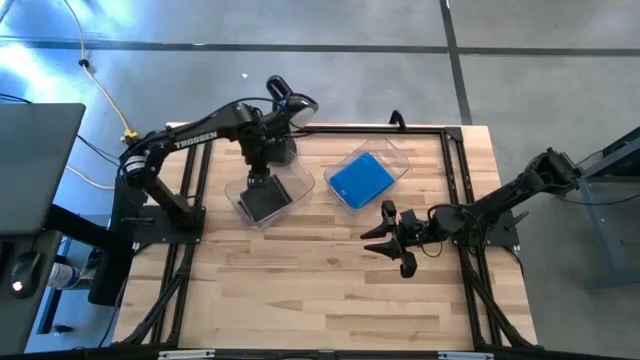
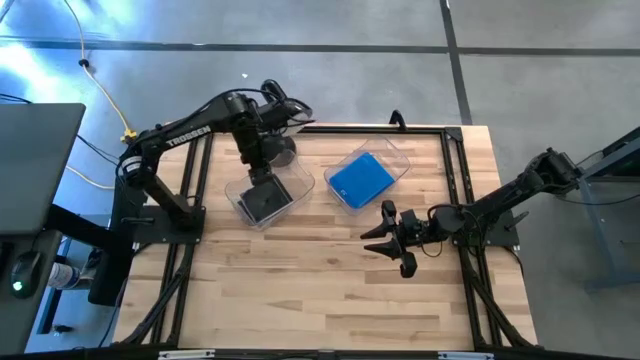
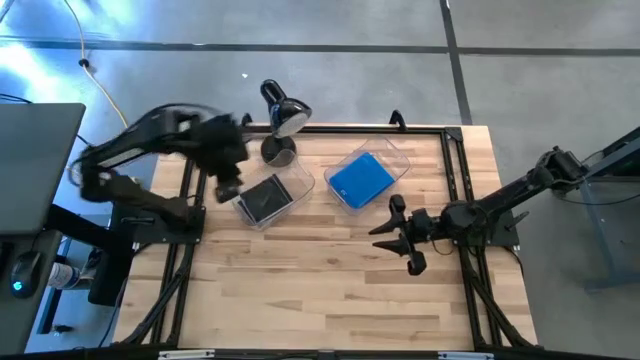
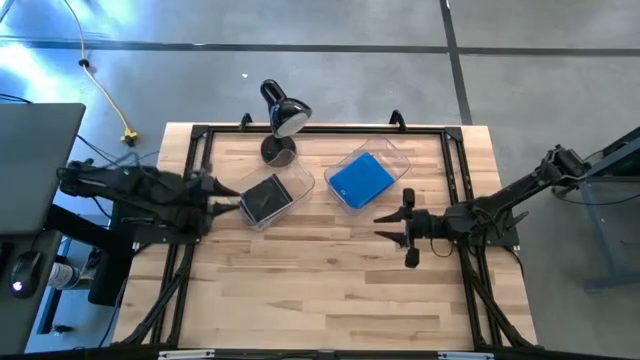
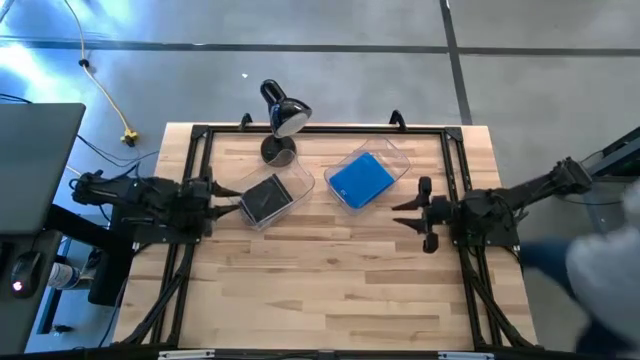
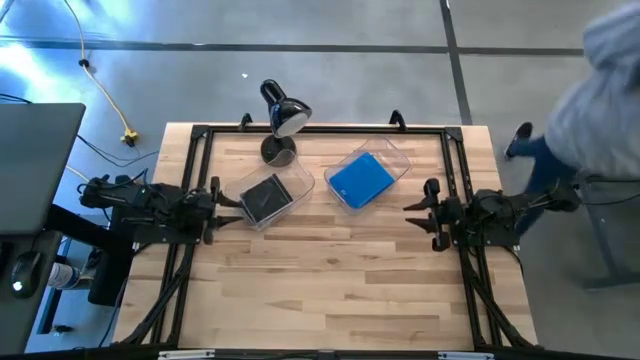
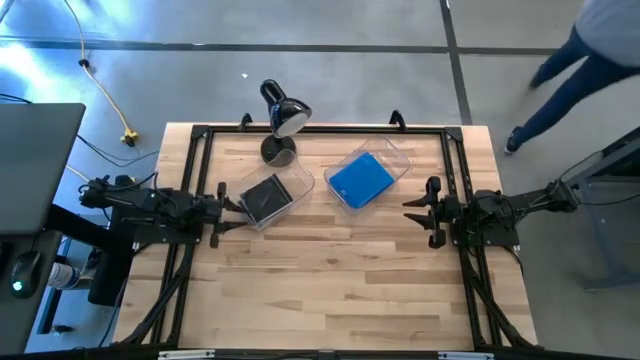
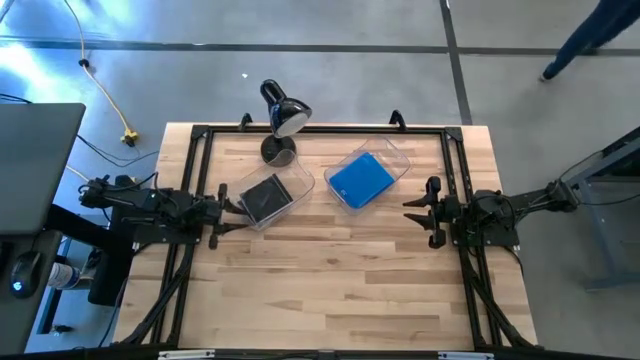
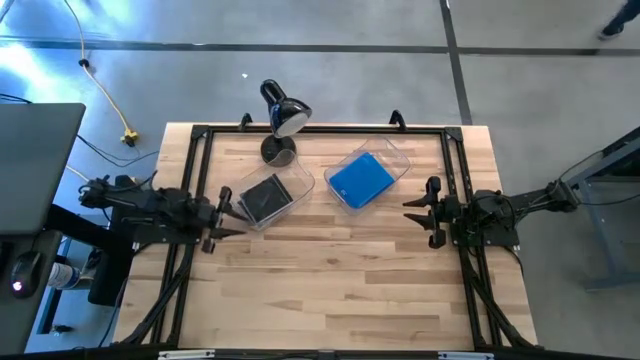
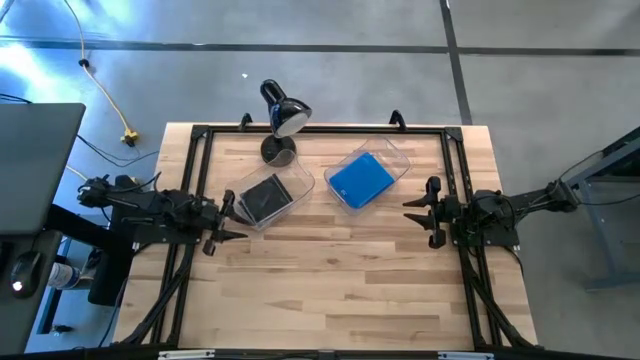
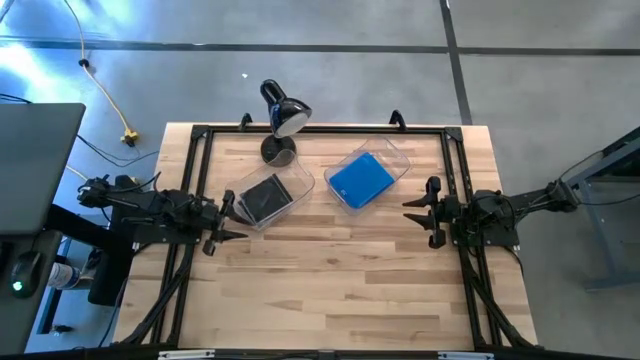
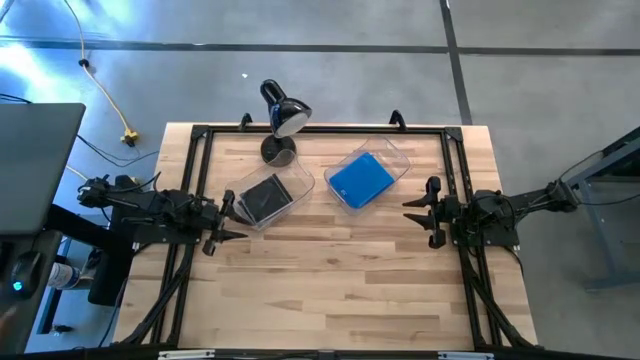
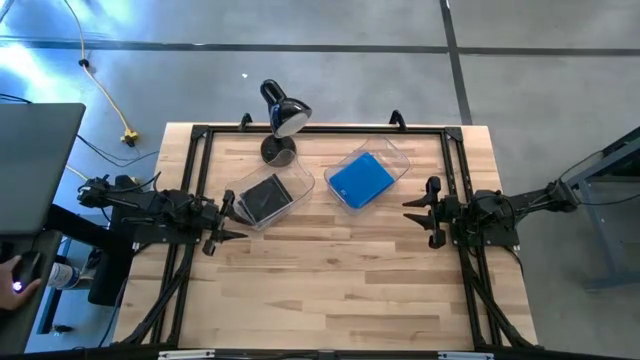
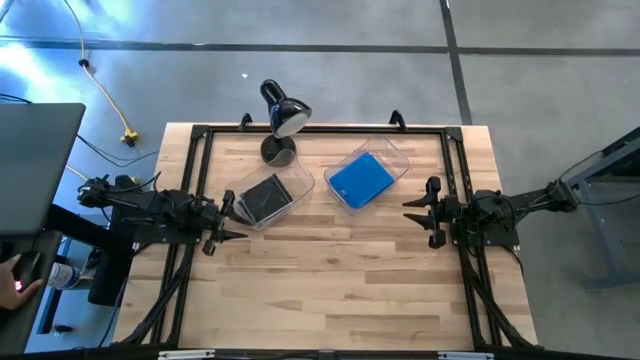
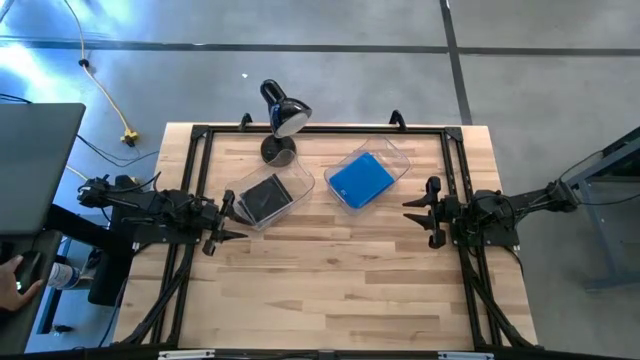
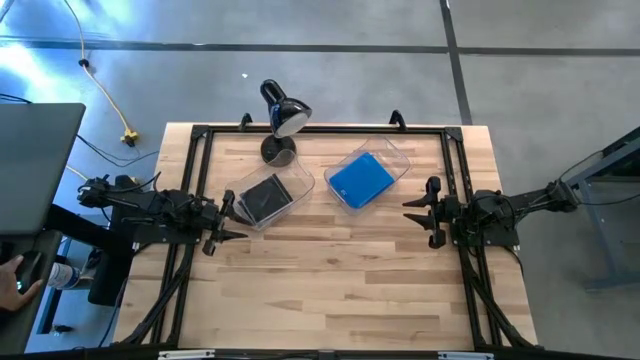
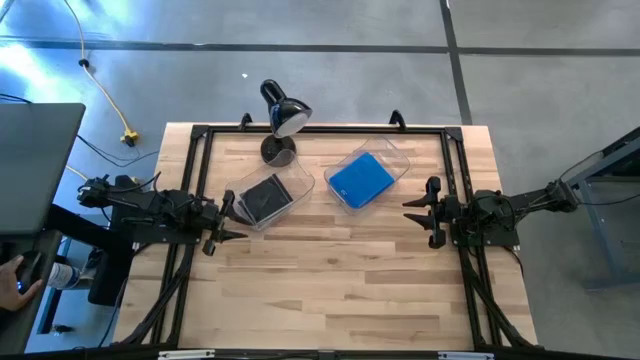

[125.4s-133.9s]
Task: Pick & place jewel cases by type
Return to Home Position

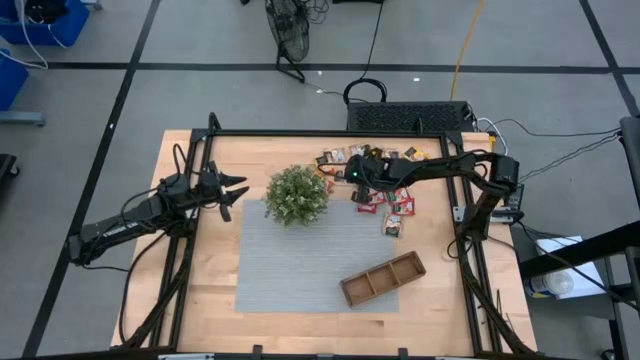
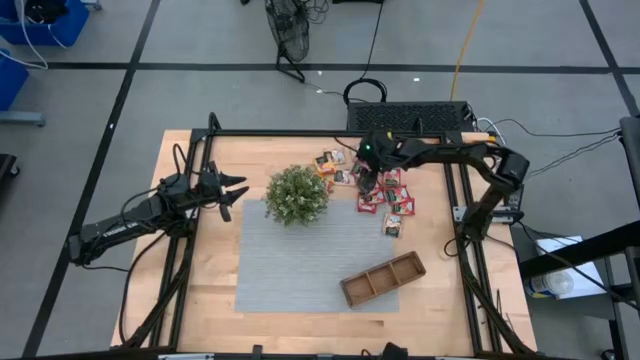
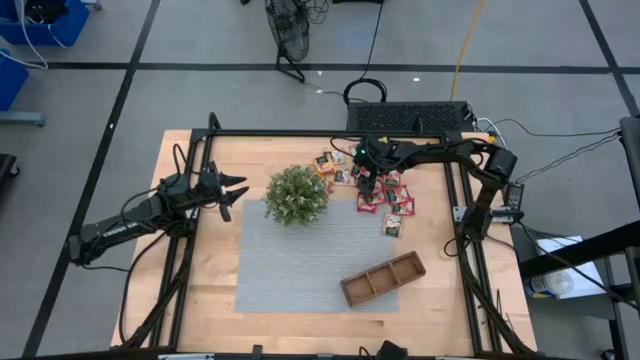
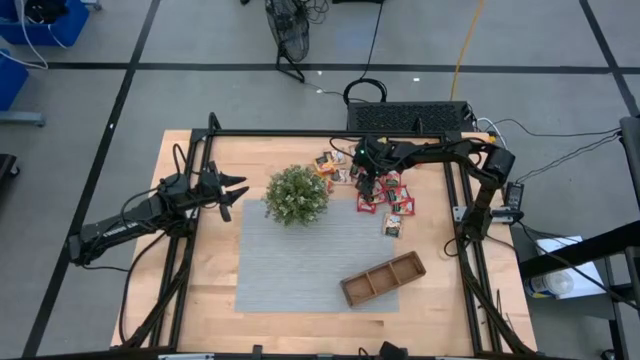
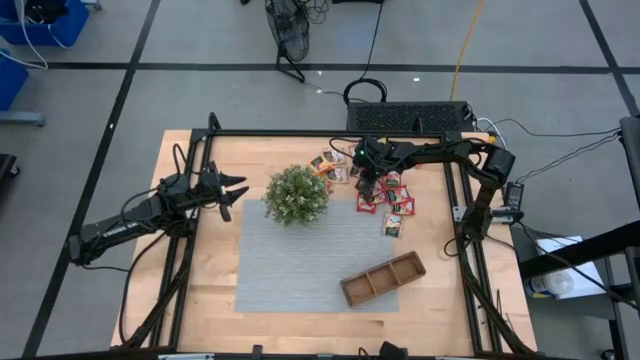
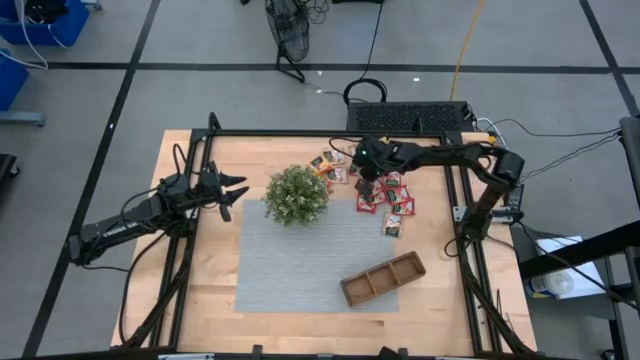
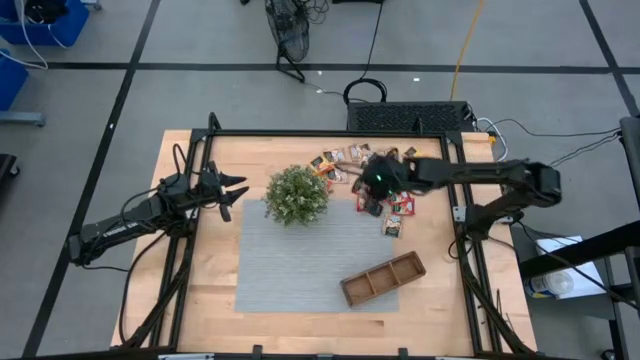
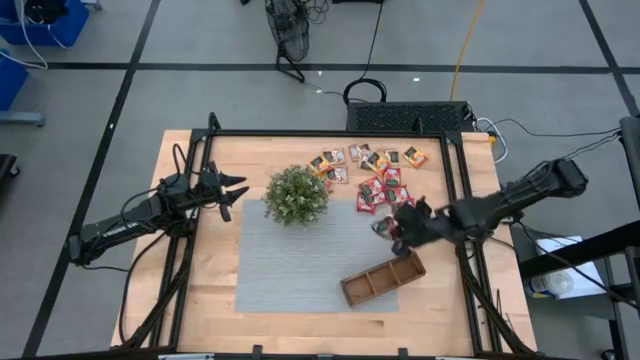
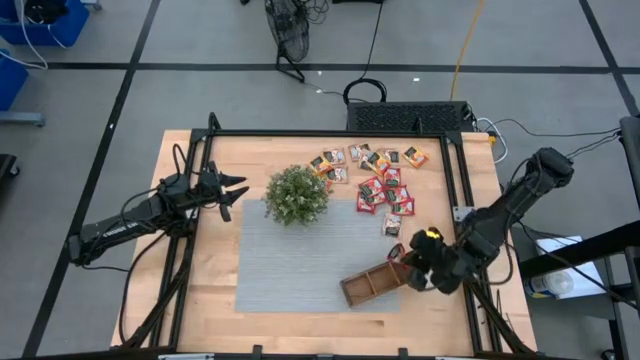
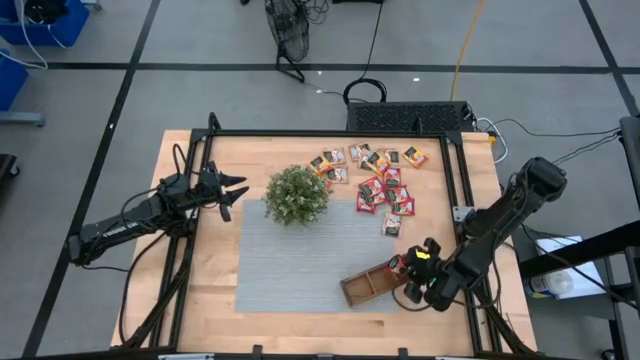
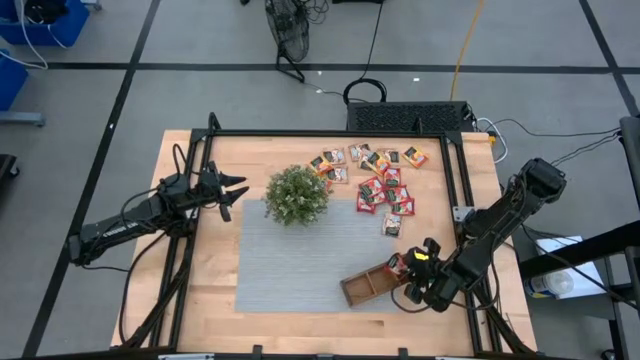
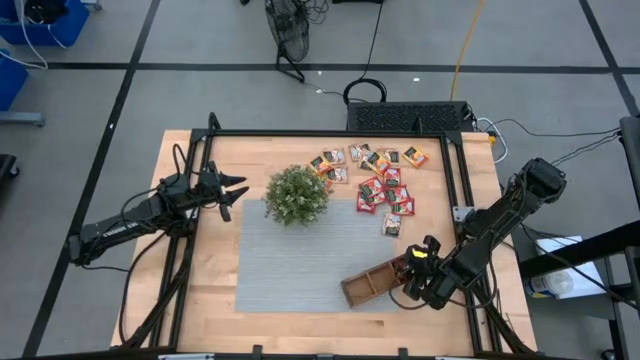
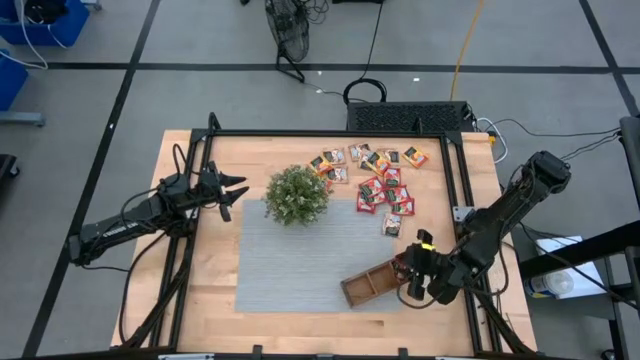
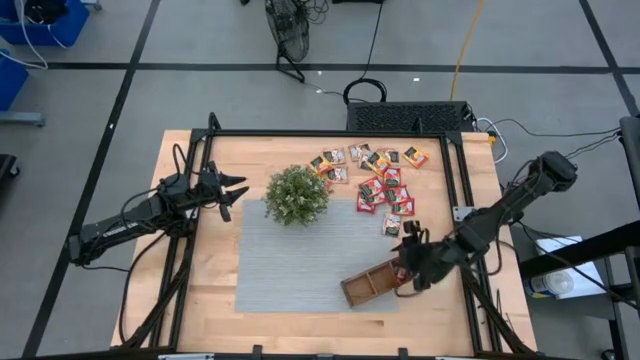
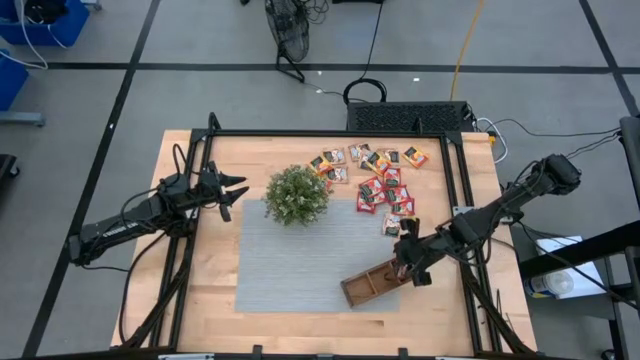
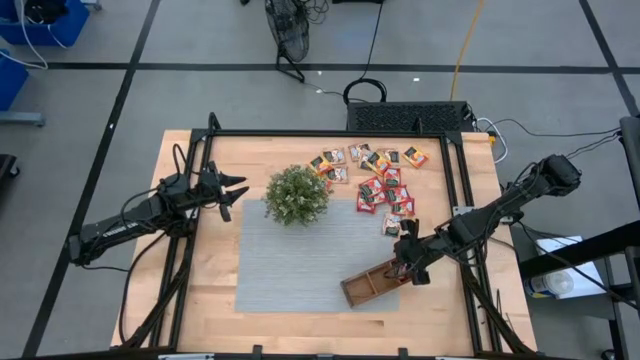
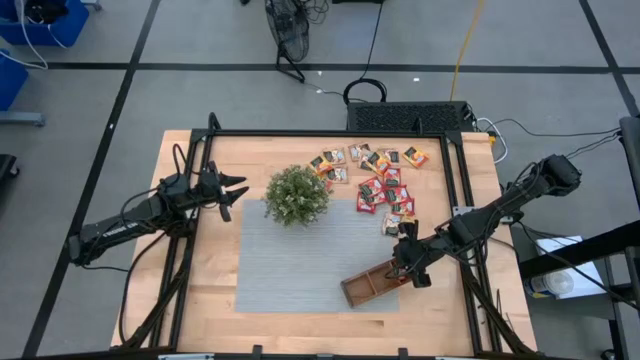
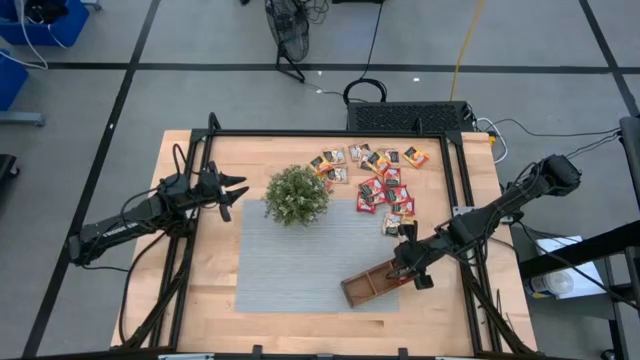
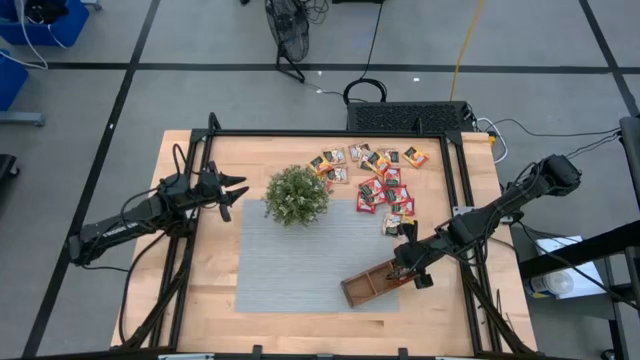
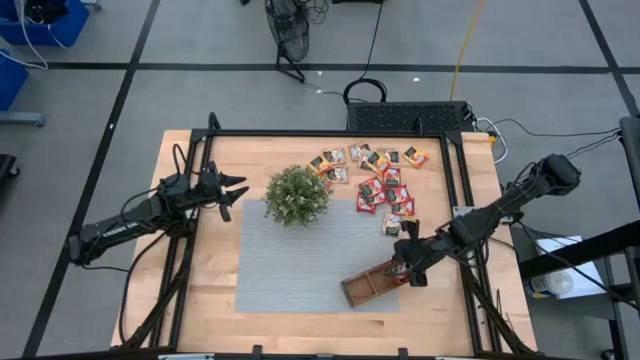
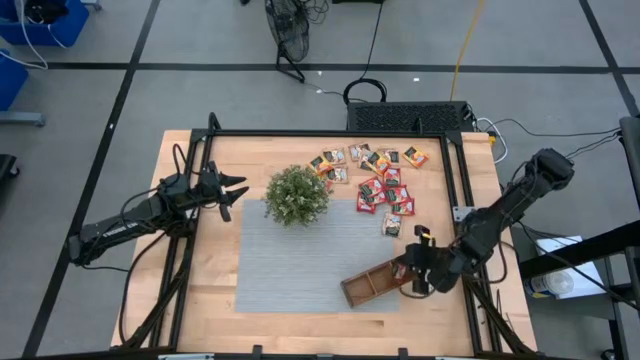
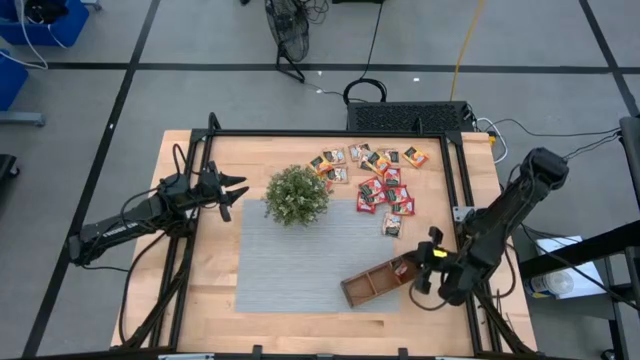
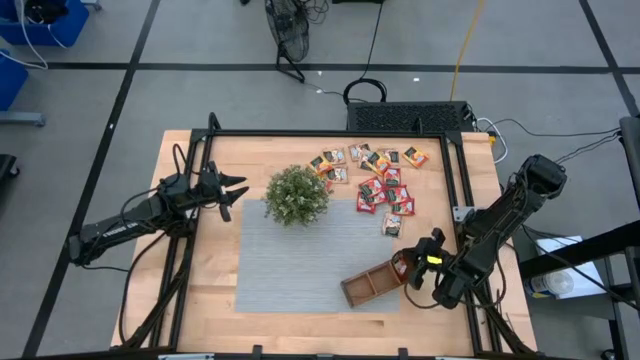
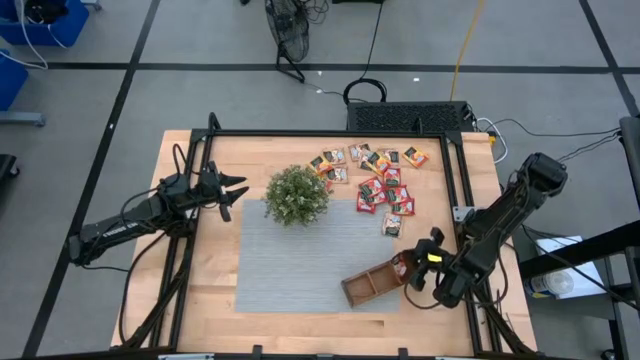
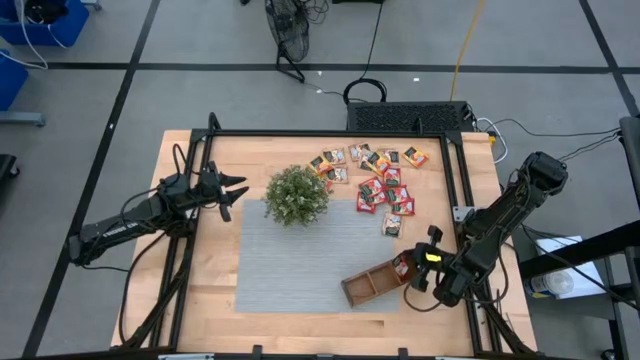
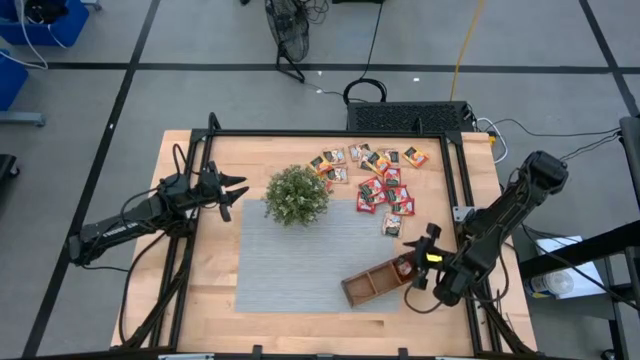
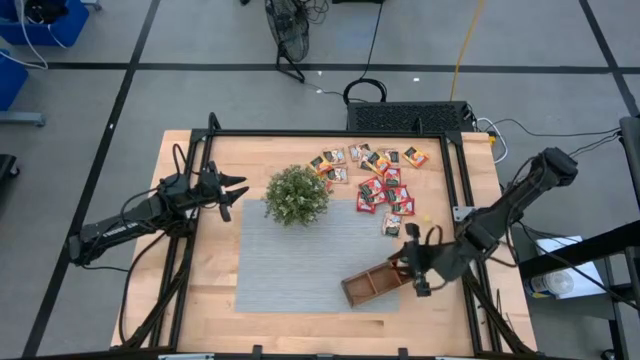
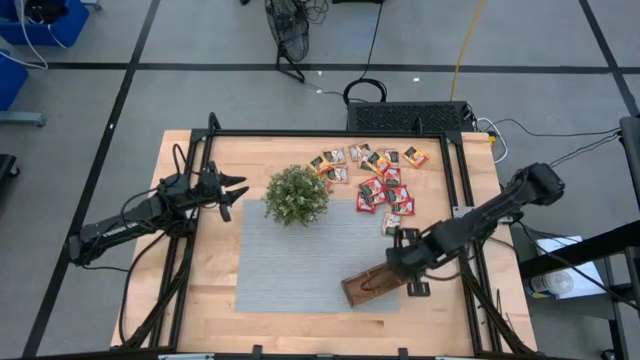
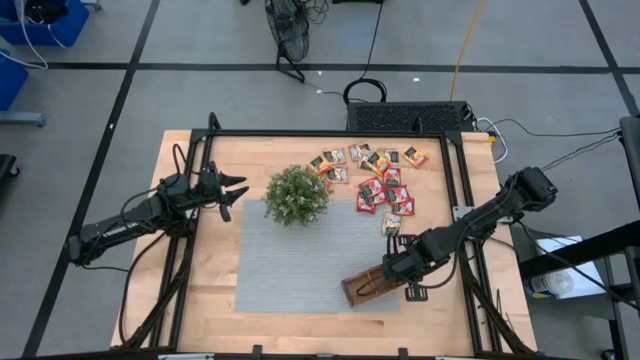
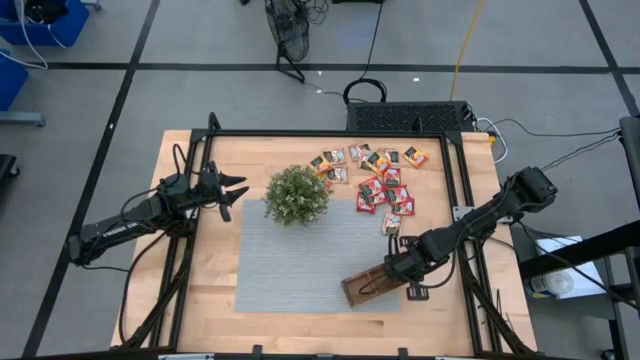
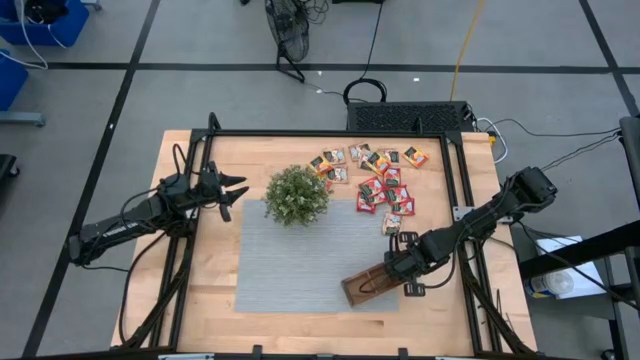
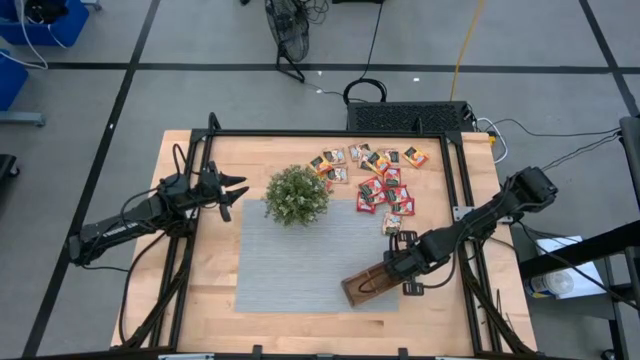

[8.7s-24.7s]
Task: Pick & Place Tea
Put the strawberry tea sachet into the brown organizer
